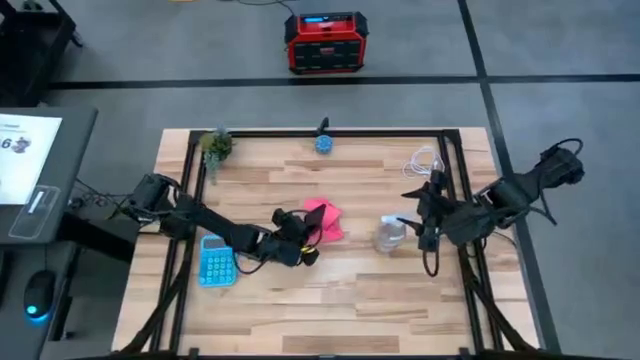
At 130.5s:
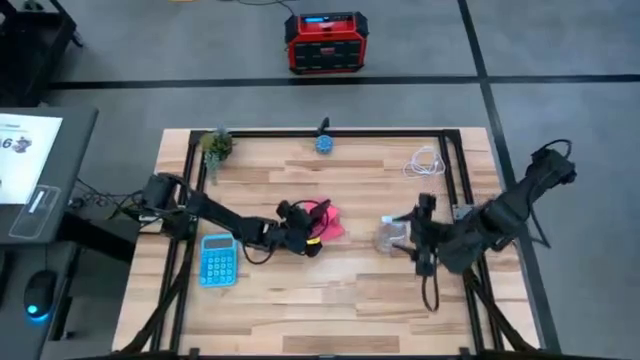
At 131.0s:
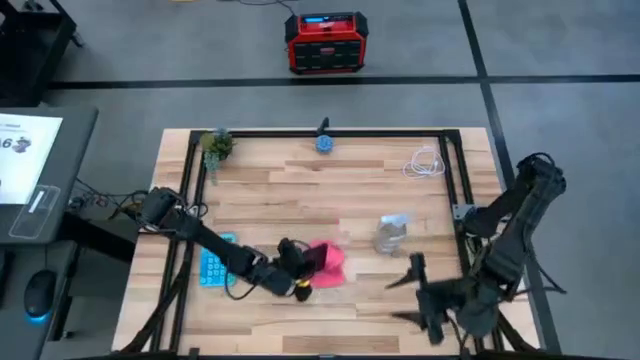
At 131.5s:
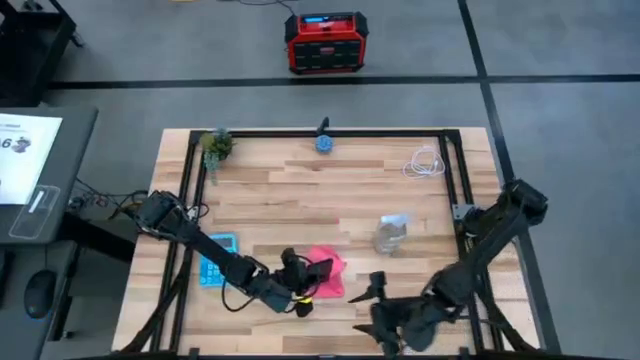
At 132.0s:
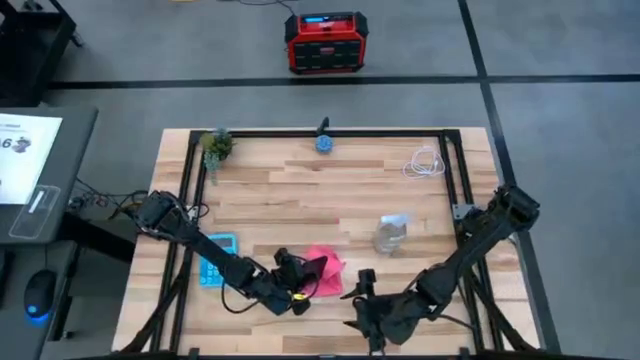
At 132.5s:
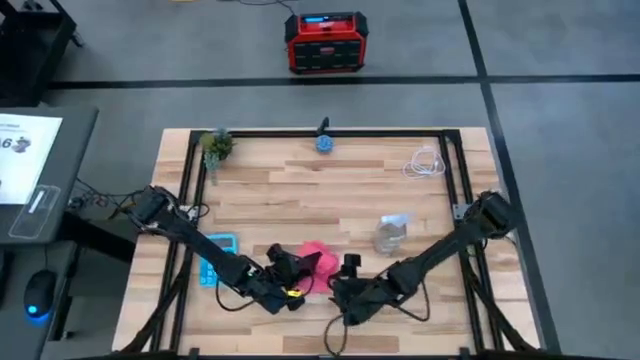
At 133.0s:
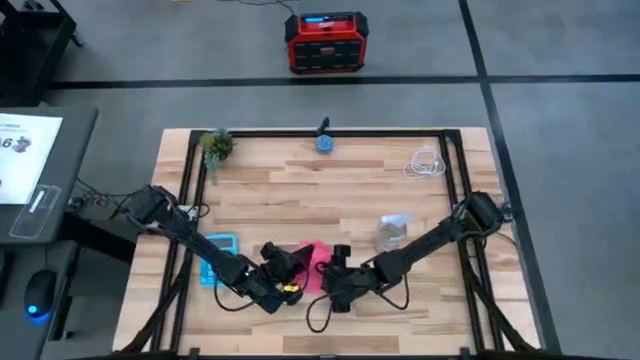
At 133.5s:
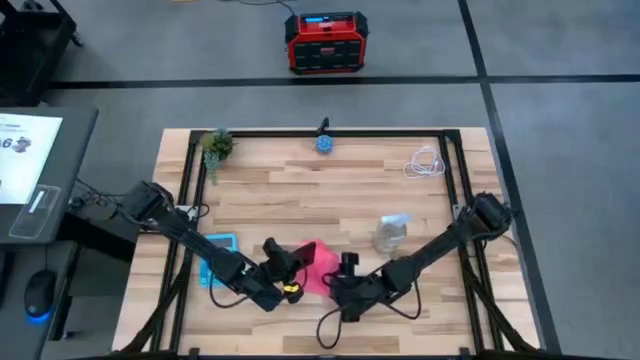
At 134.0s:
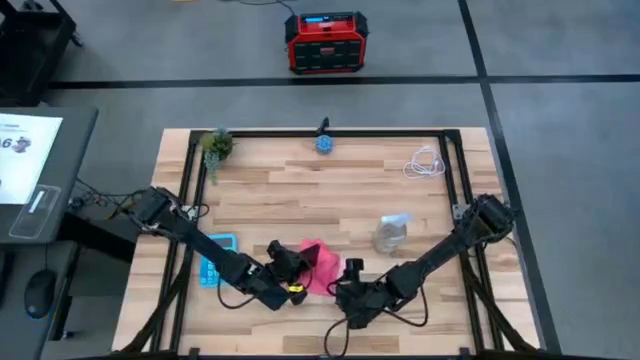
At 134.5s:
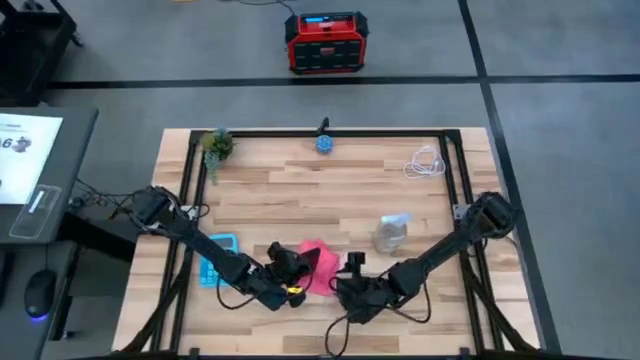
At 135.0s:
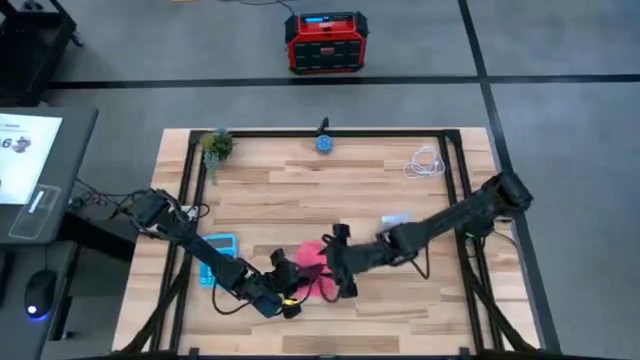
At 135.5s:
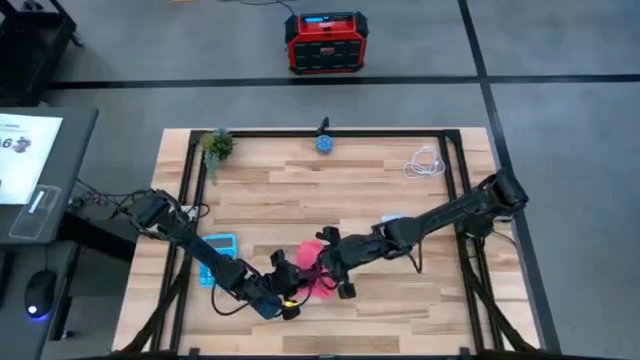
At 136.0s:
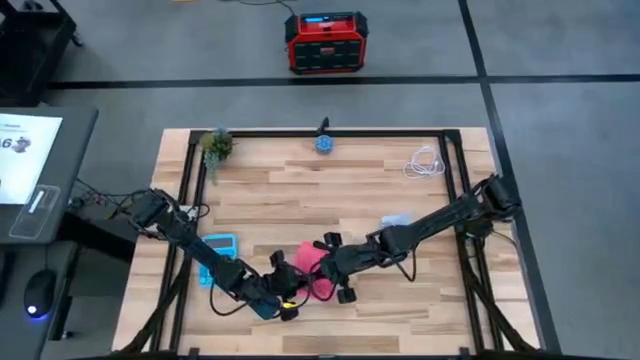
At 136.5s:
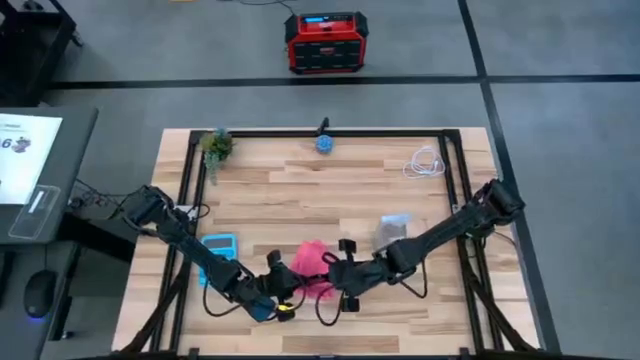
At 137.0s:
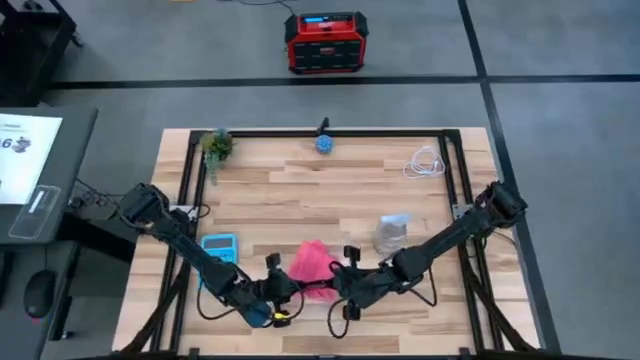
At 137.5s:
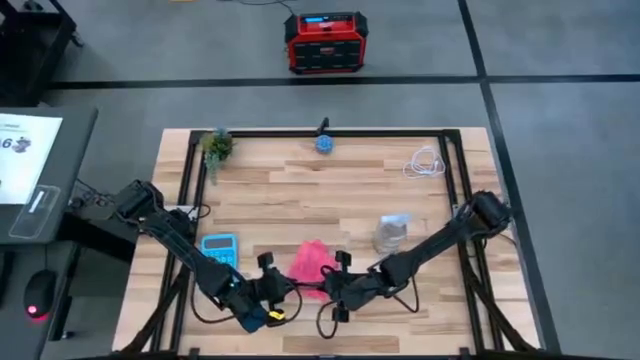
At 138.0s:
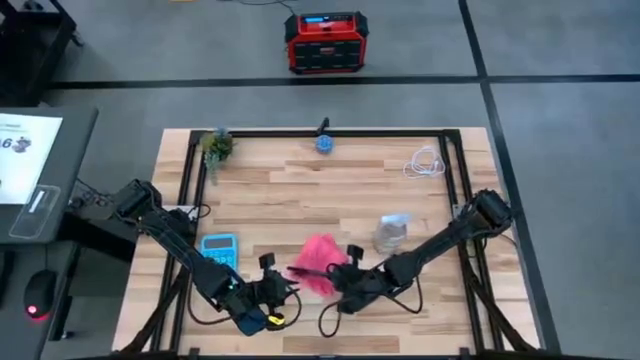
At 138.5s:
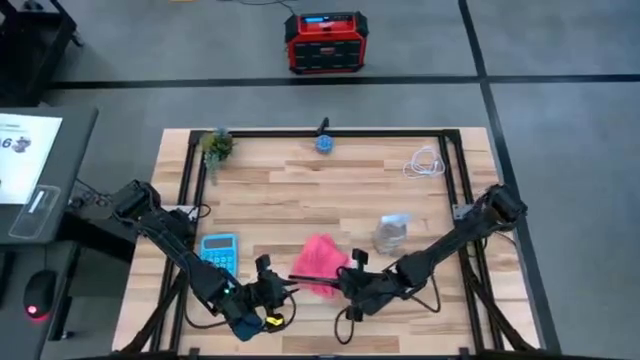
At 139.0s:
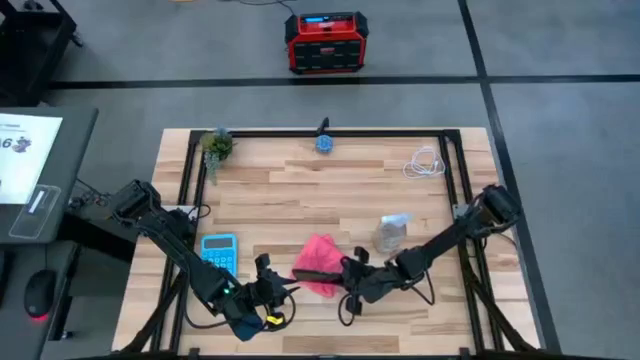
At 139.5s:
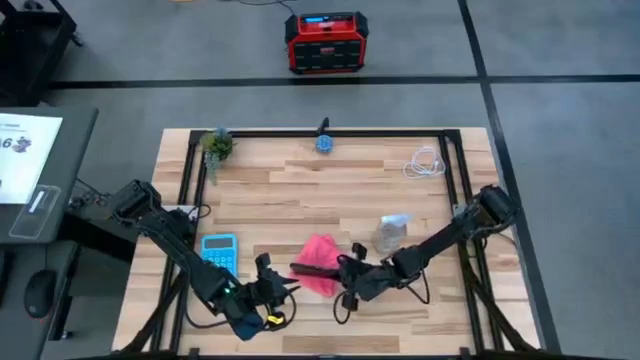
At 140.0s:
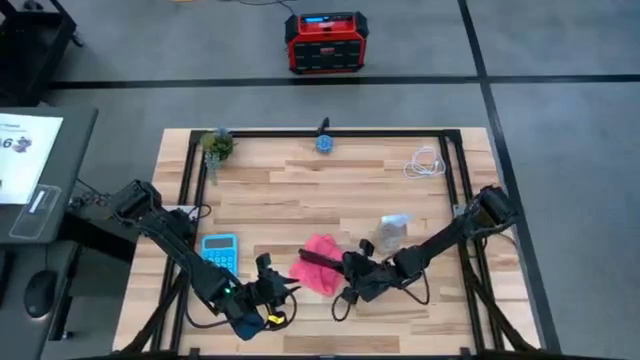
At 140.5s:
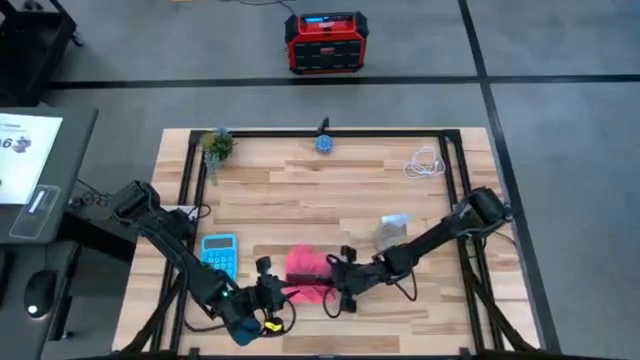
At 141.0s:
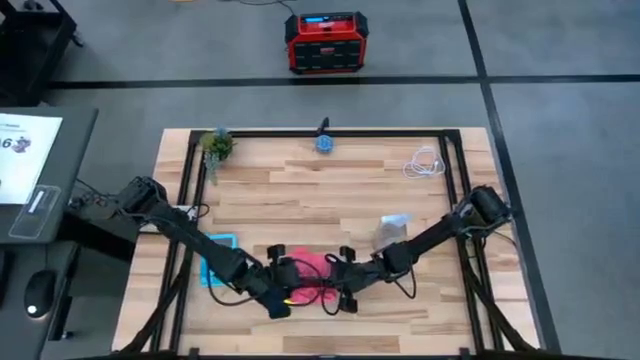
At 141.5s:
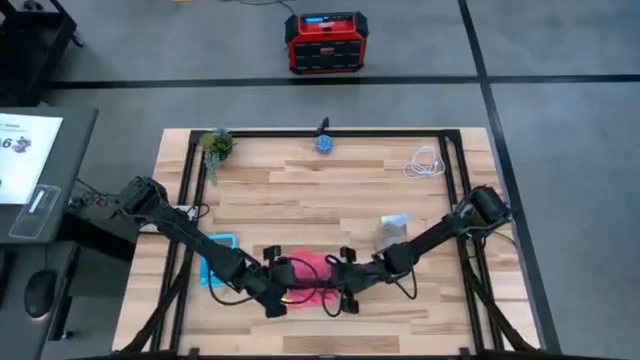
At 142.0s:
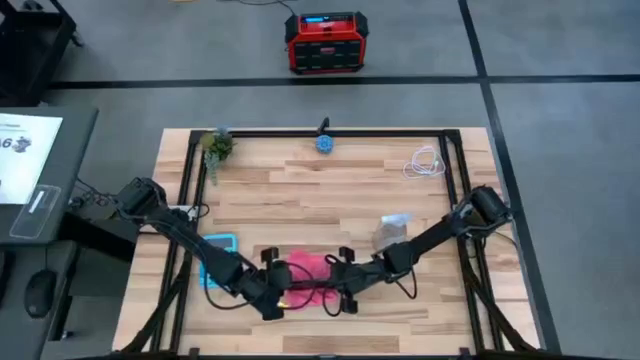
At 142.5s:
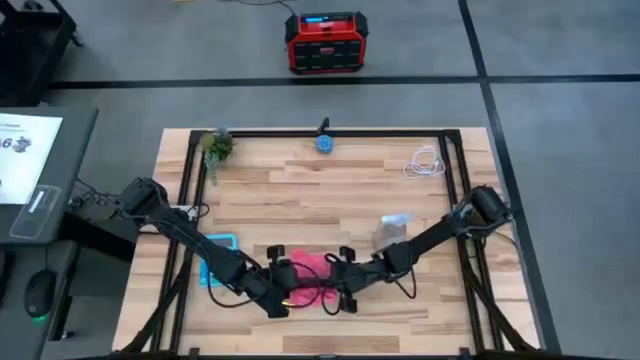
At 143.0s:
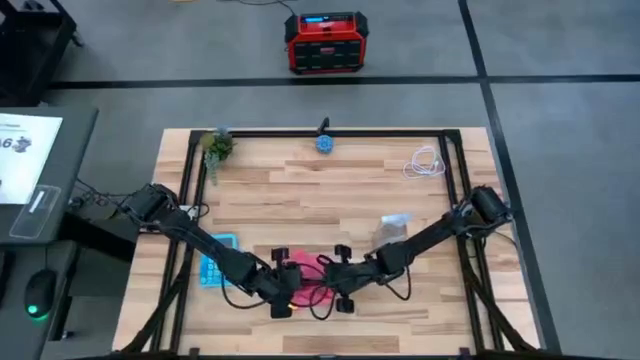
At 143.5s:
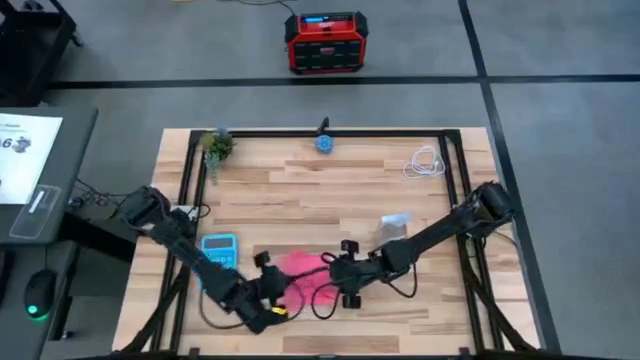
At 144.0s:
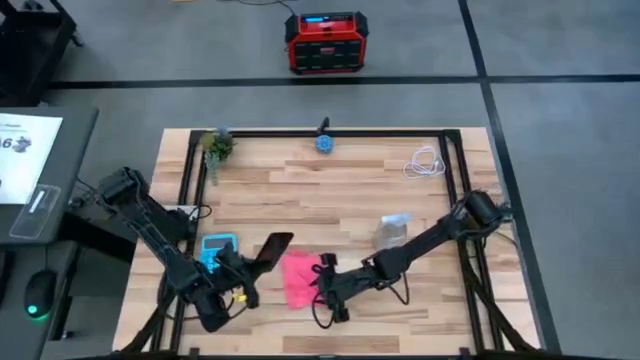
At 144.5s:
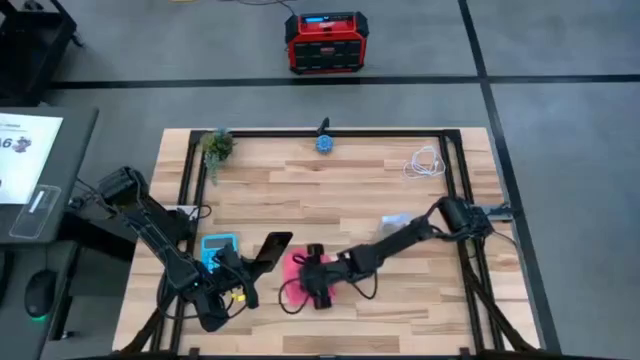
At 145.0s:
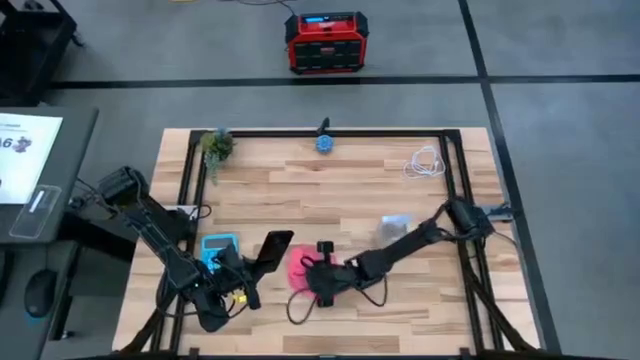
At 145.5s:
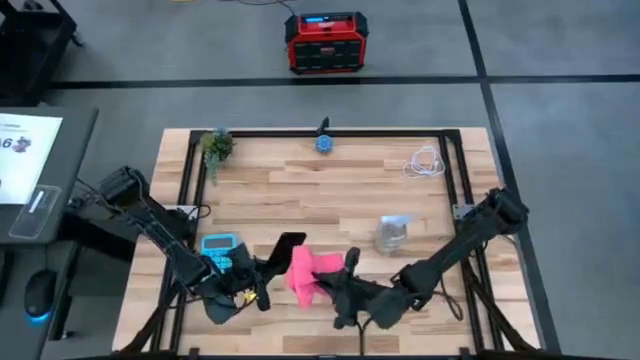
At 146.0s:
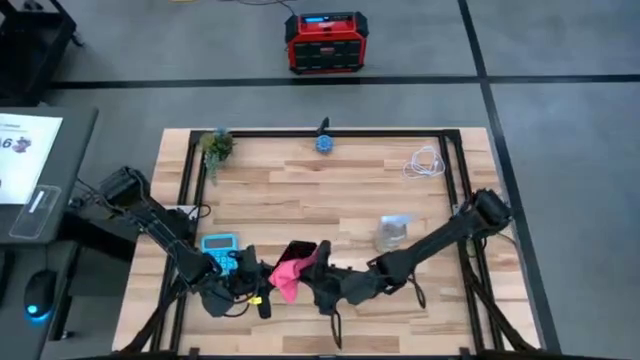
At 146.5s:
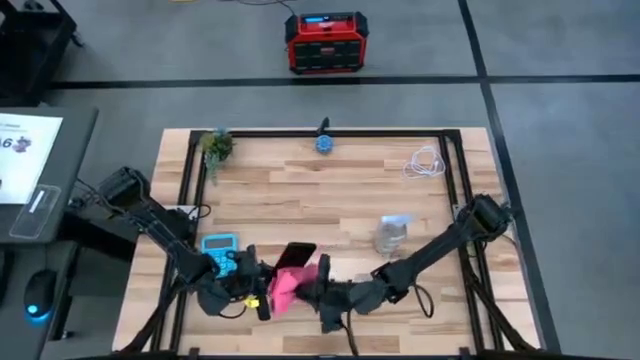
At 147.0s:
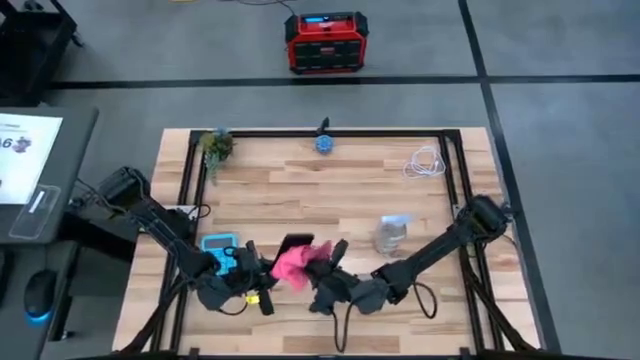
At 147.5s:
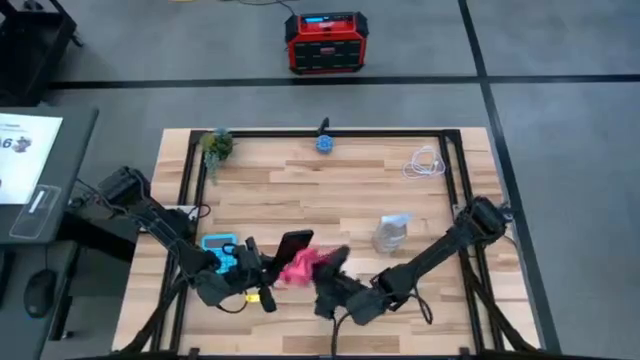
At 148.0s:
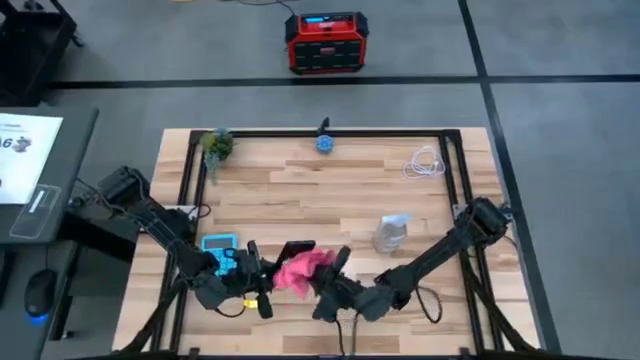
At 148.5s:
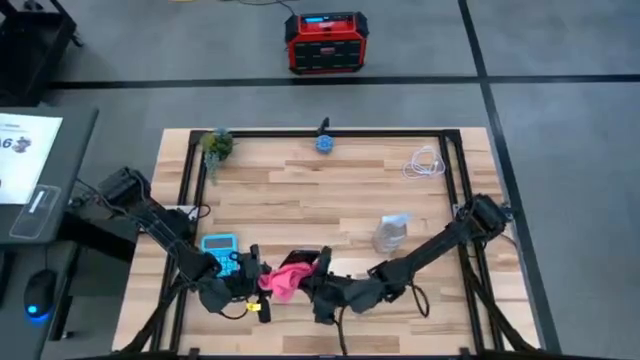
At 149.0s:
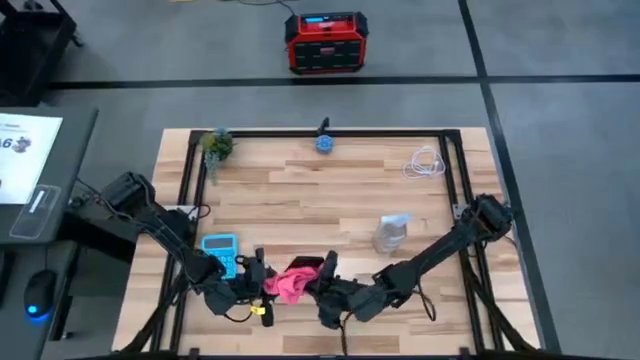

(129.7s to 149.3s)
Task: Apply microfiber cloth
Wipe the back of the black cellphone using pink microfiber cloth

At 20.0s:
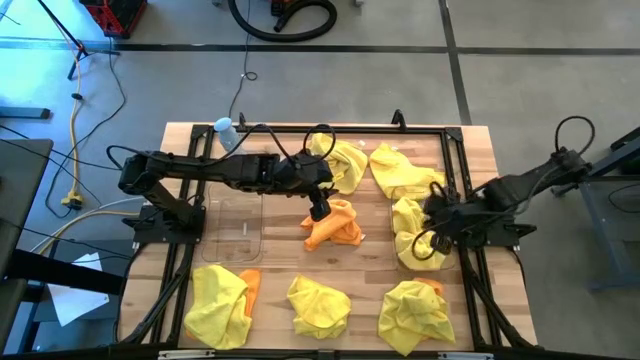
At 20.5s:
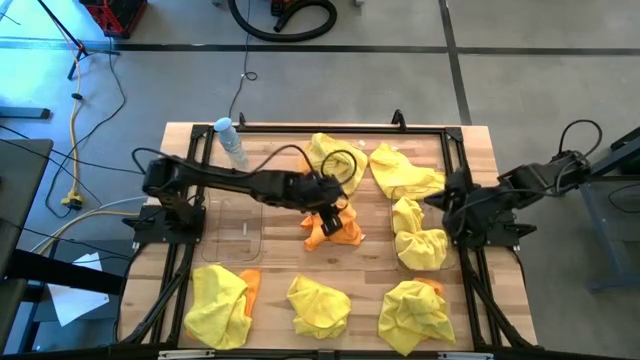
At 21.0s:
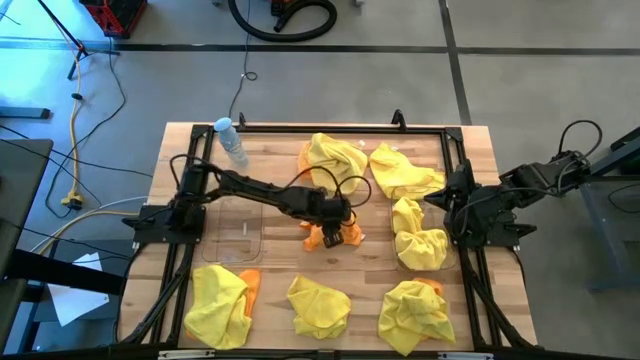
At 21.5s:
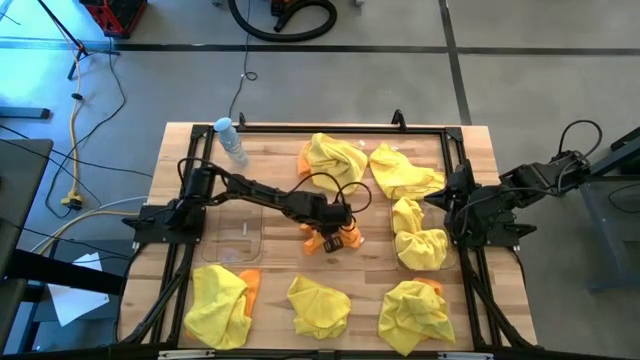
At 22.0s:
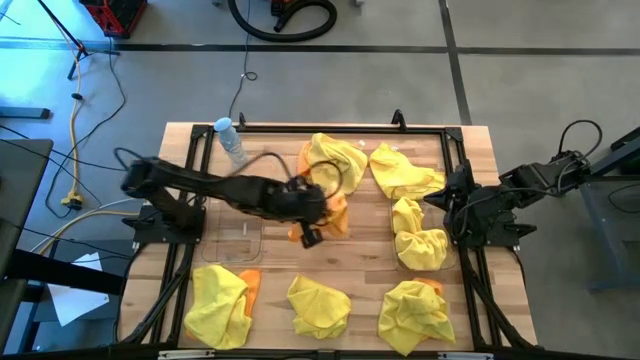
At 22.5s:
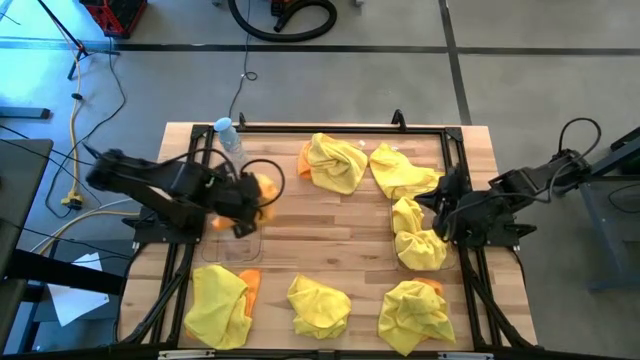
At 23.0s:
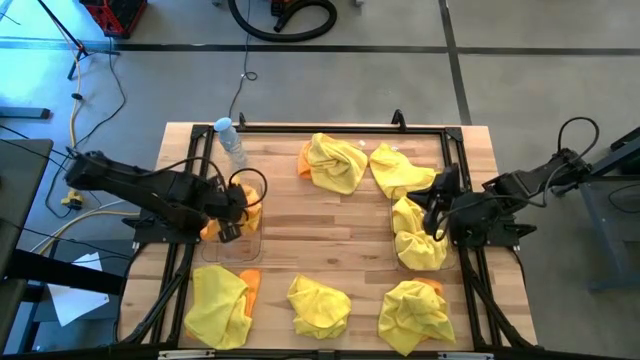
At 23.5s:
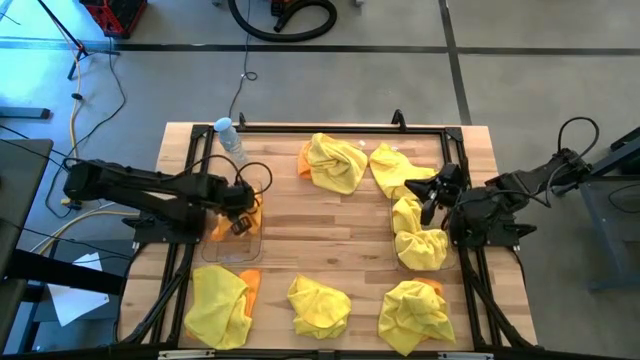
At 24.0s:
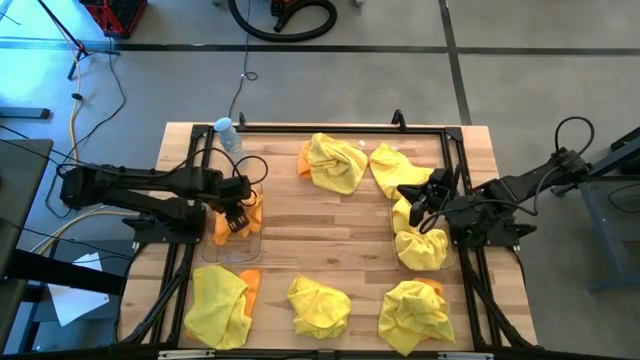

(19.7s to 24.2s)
Task: Sort microfiber towel by color & place in baskets
Put the orange towel into the left transparent bin
